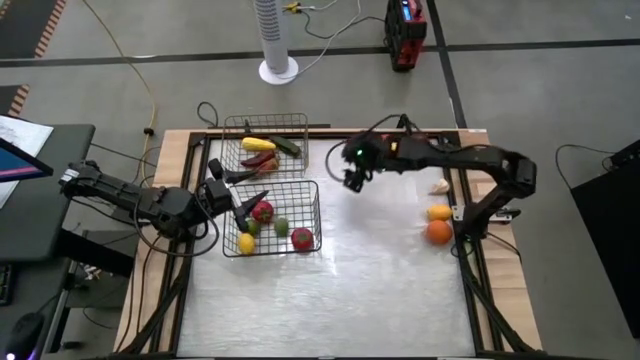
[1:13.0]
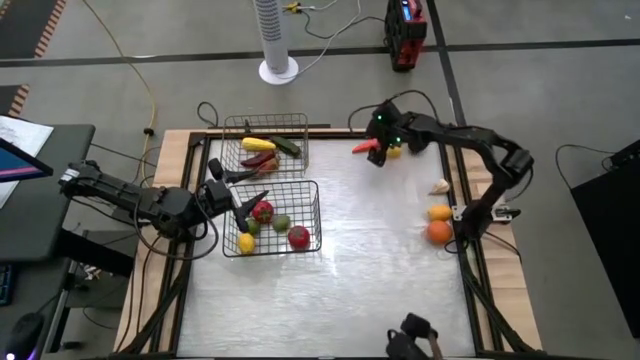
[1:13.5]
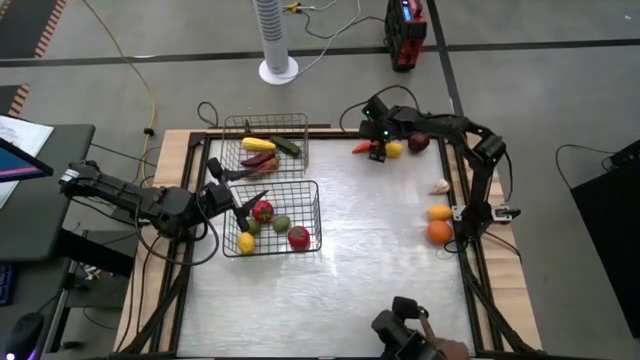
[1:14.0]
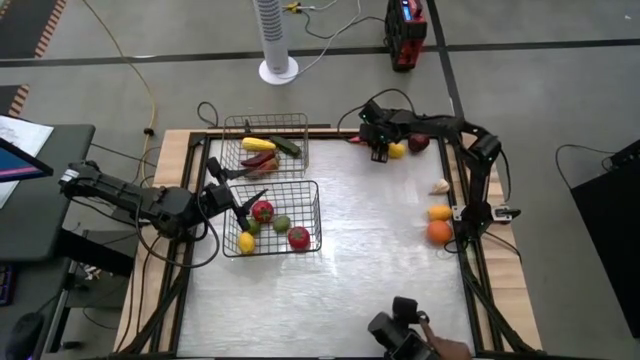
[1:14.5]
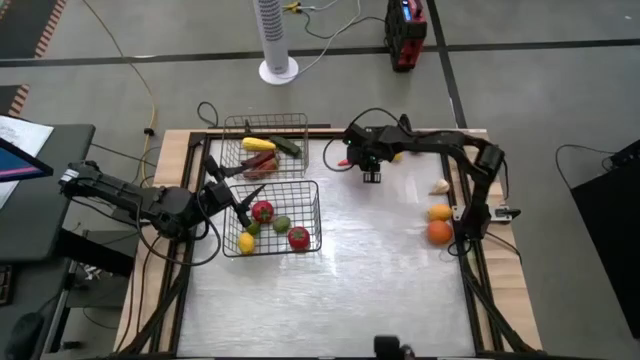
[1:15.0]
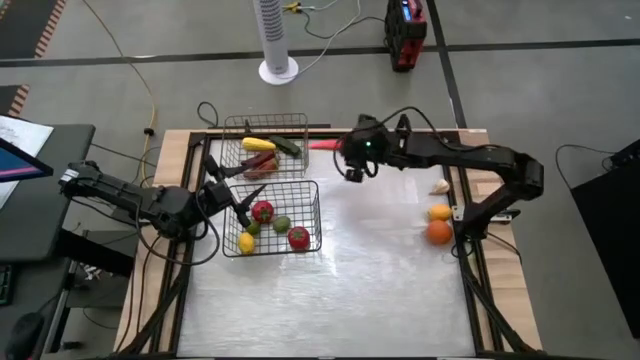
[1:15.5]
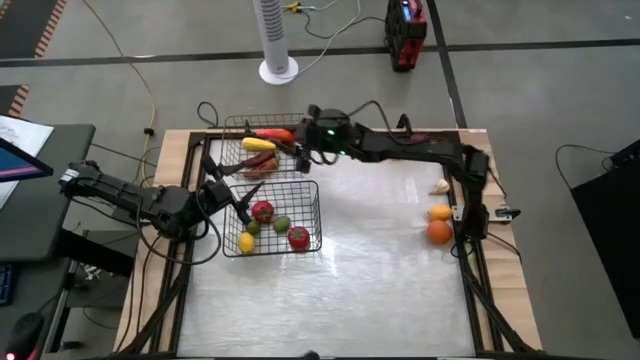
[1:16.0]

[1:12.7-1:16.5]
Task: Sort produce into baskets
Put the orange carrot into the top wire basket

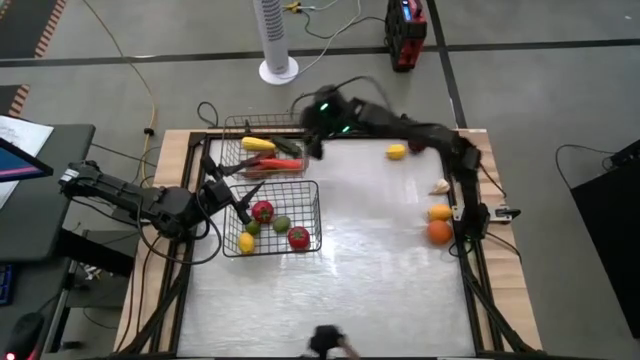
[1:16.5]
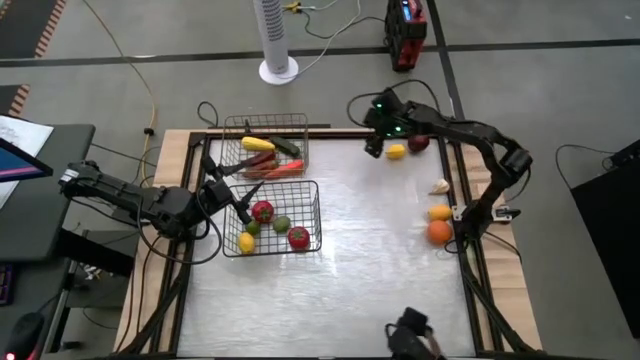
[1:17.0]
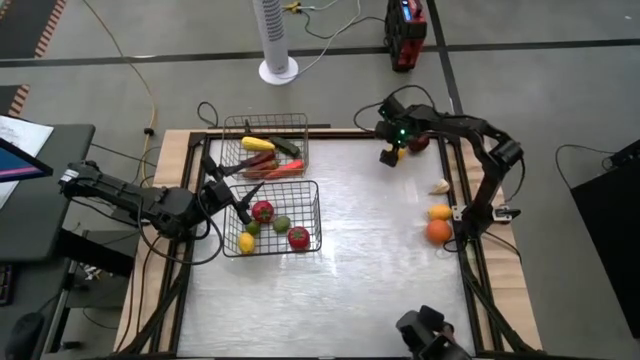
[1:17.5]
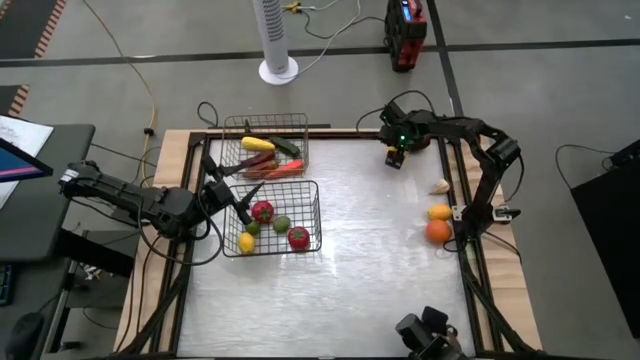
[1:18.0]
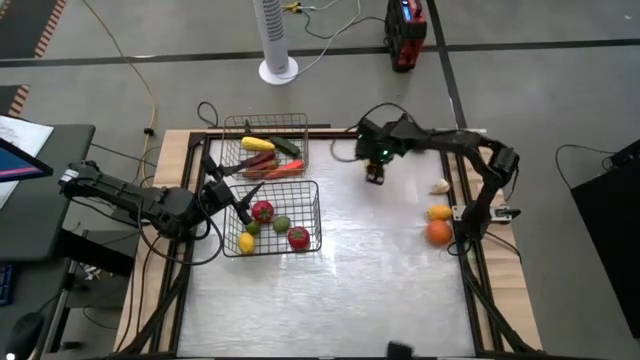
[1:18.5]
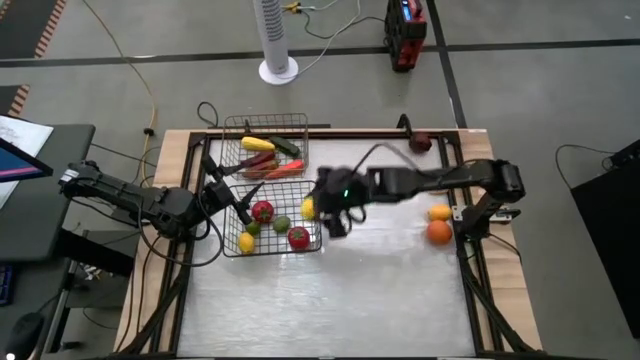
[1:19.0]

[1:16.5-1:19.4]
Put the top yellow lemon into the bottom wire basket

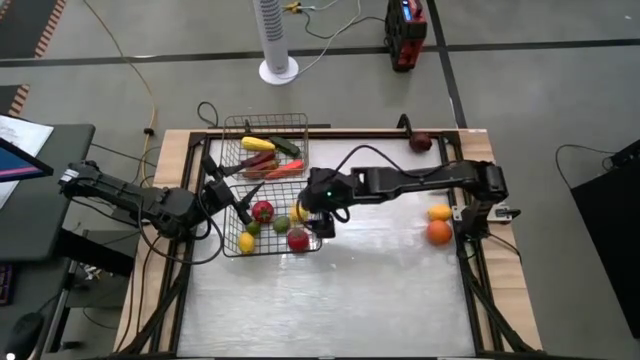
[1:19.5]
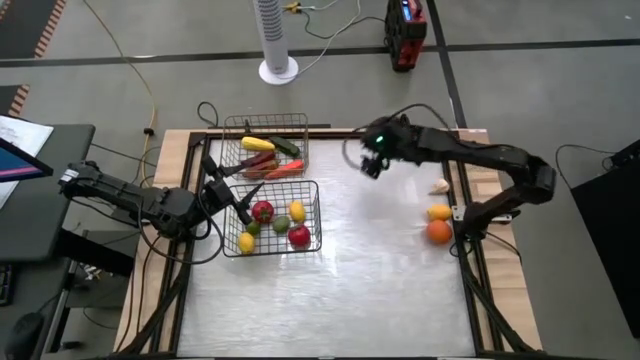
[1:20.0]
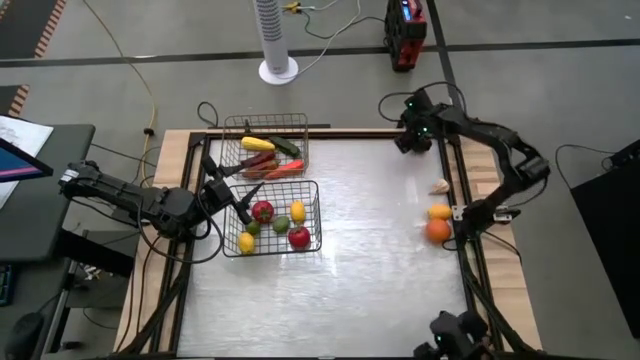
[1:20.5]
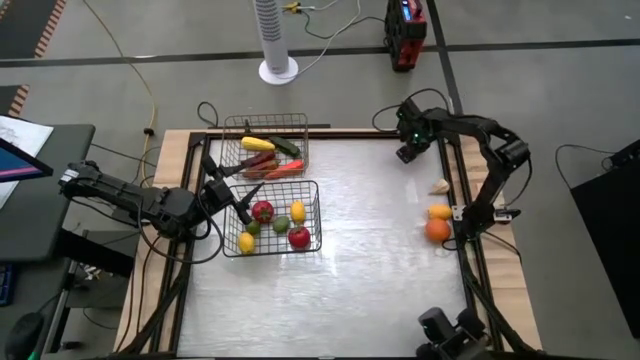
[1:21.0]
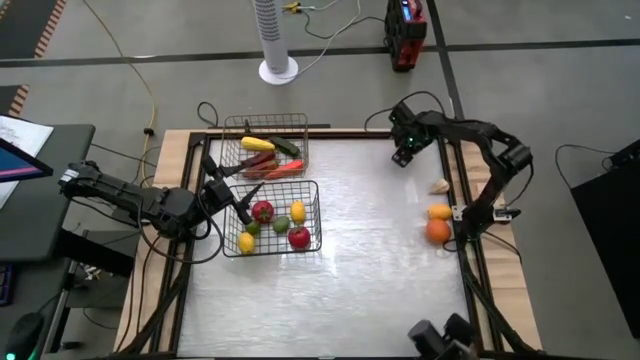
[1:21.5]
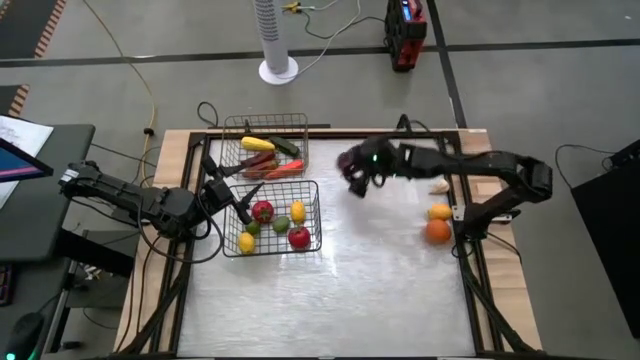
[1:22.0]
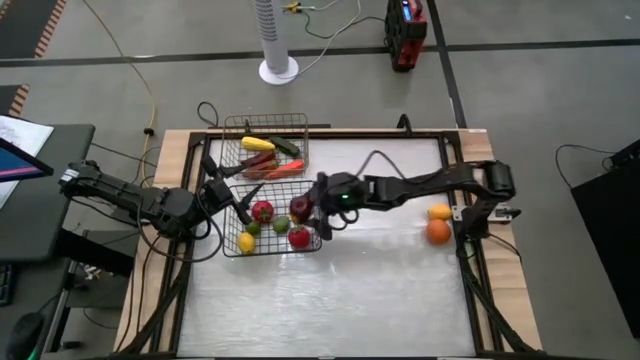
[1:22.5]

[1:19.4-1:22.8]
Put the red apple into the bottom wire basket

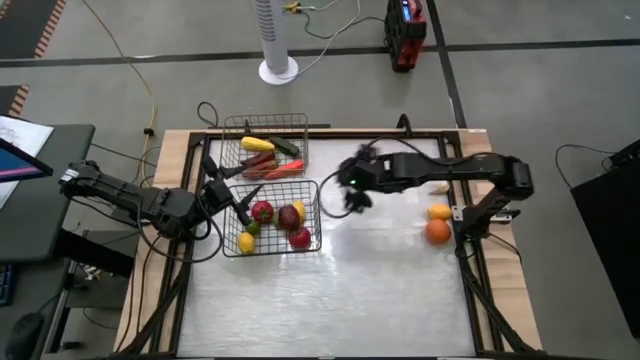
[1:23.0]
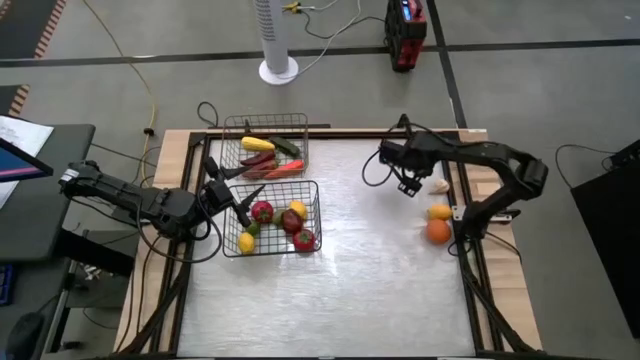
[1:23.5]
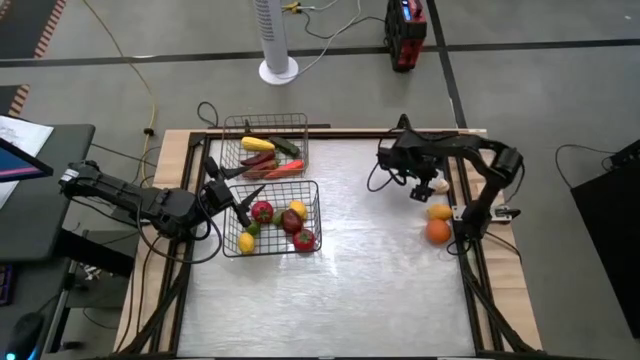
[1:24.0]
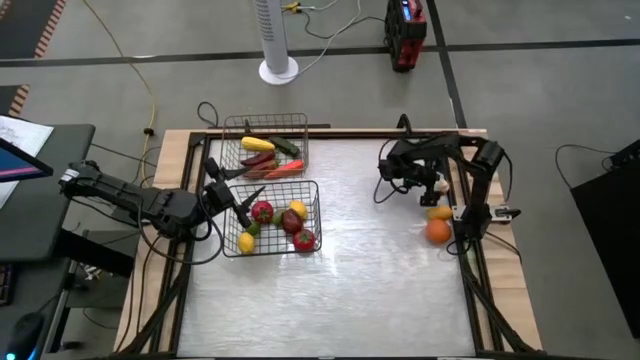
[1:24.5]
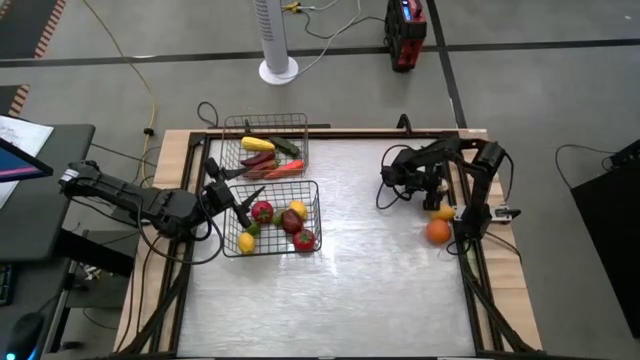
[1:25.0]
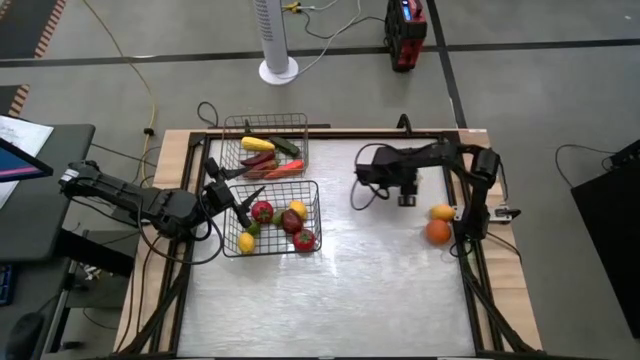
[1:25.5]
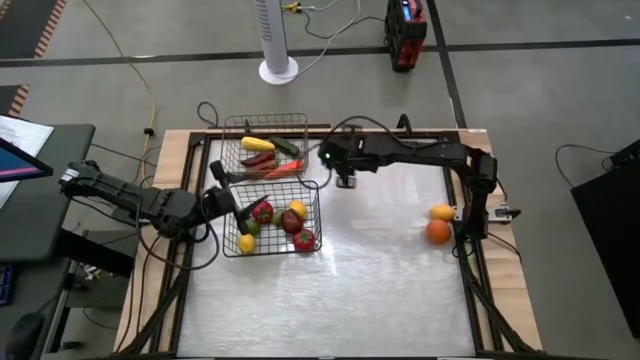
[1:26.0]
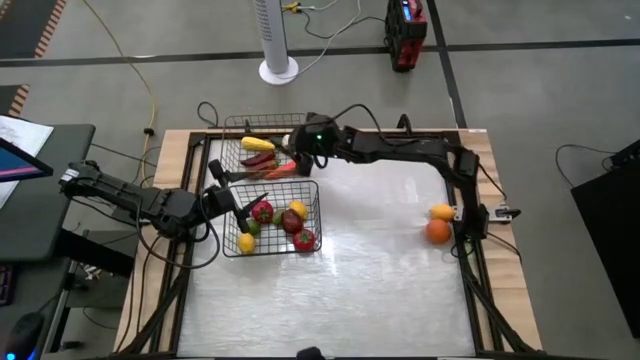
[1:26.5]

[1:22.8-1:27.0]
Put the white garlic into the top wire basket

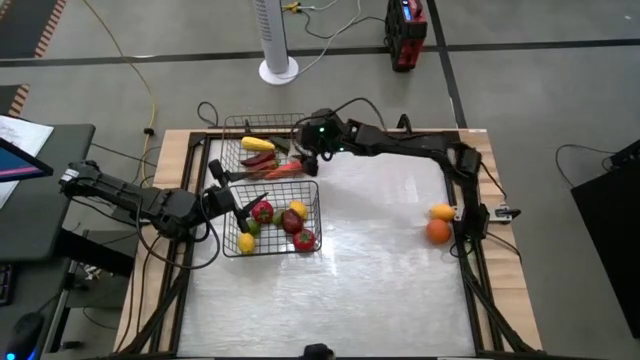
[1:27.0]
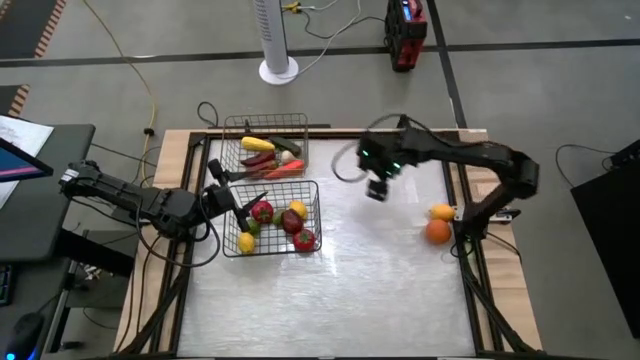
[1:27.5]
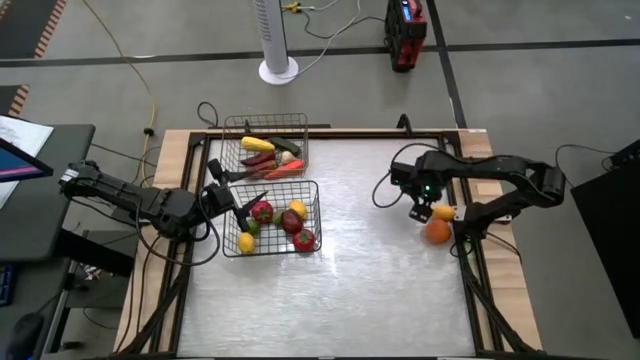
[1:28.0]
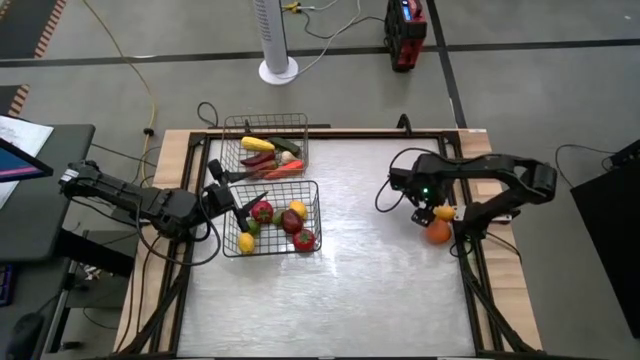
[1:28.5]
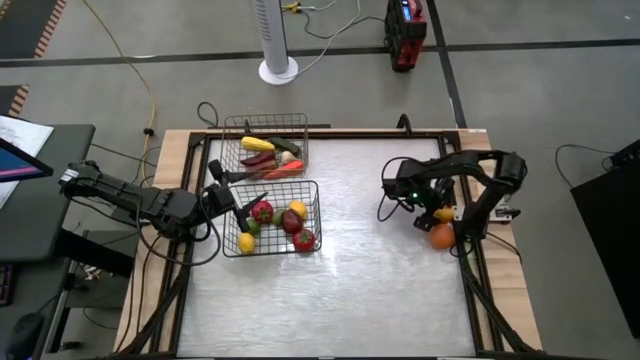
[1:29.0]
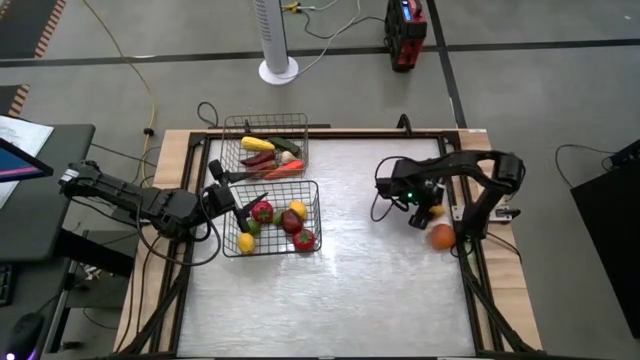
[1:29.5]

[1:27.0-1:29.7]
Put the yellow lemon into the bottom wire basket

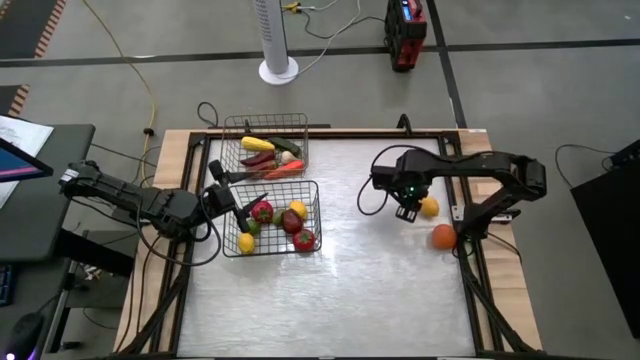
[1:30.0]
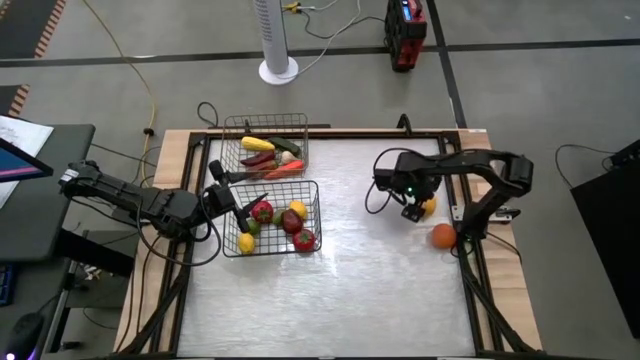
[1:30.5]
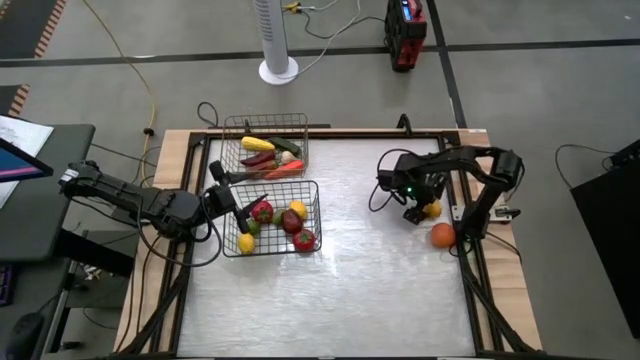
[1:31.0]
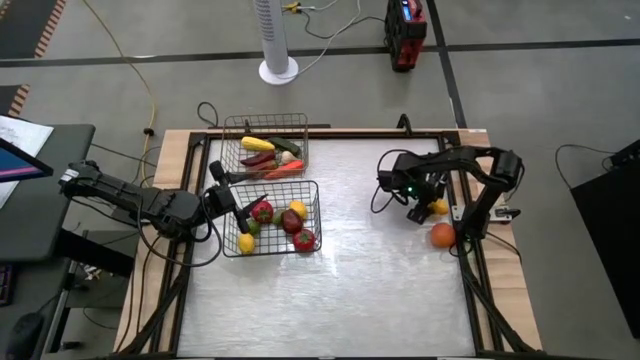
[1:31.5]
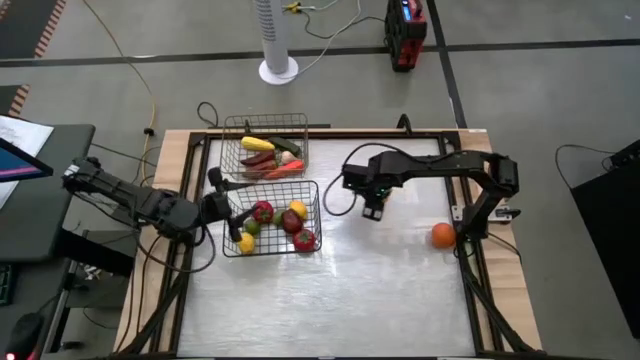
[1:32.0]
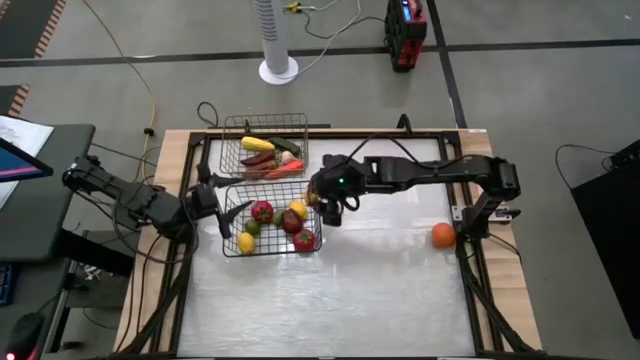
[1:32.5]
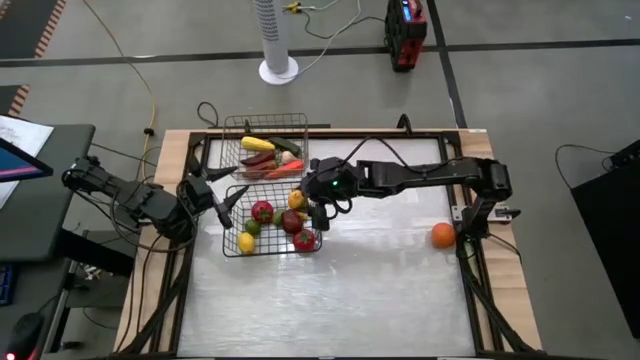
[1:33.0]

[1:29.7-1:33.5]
Put the yellow lemon into the bottom wire basket
